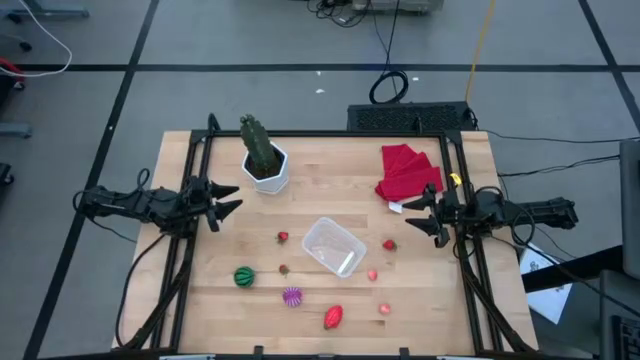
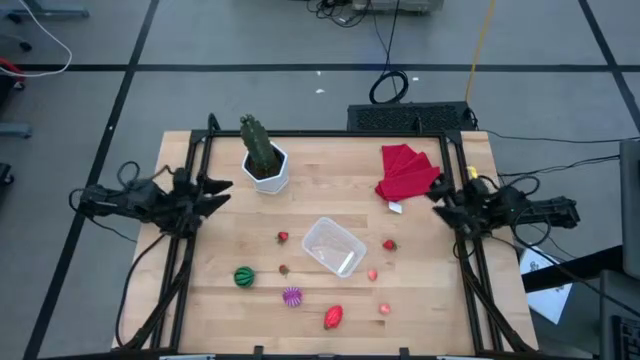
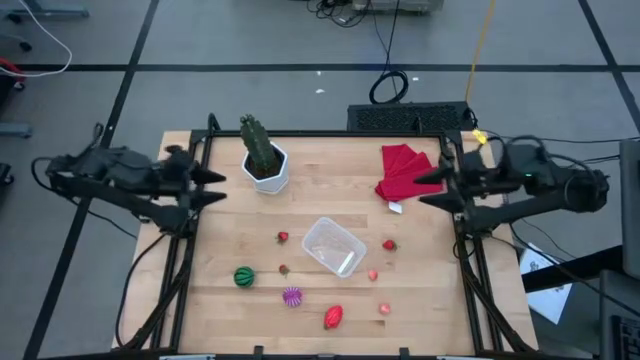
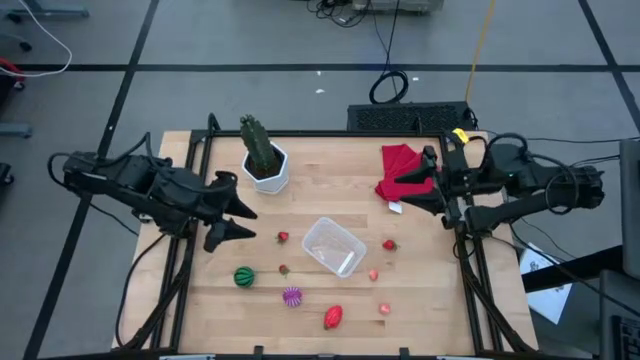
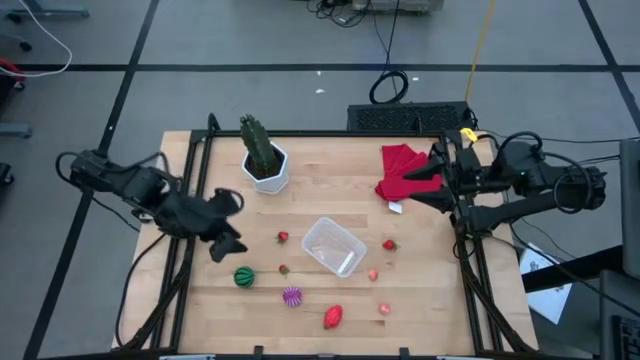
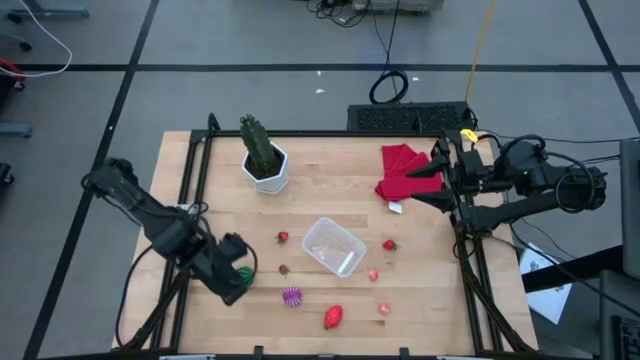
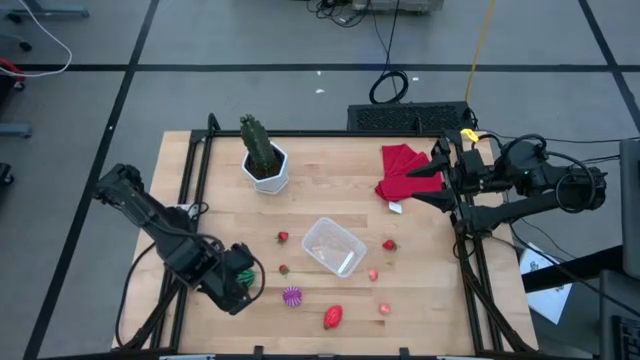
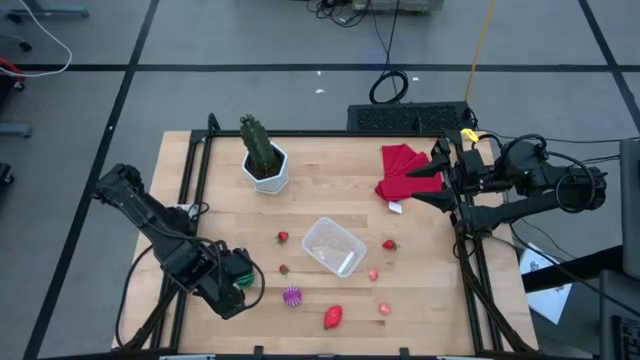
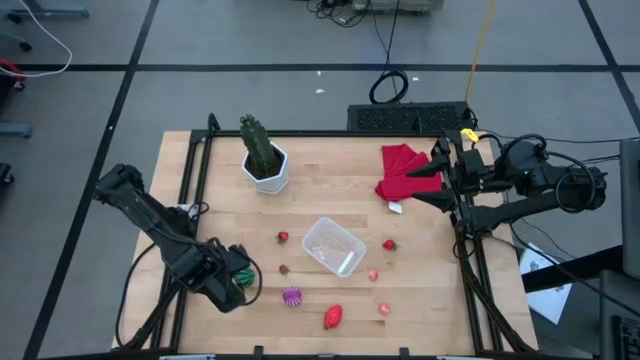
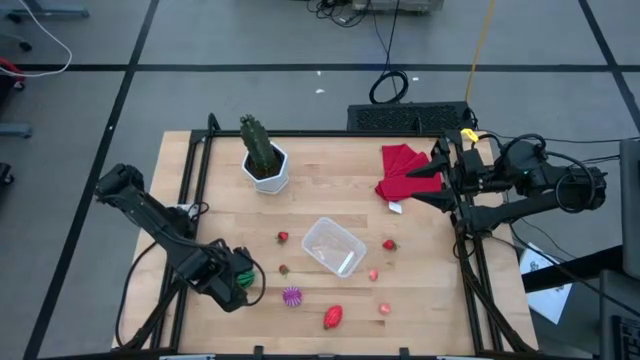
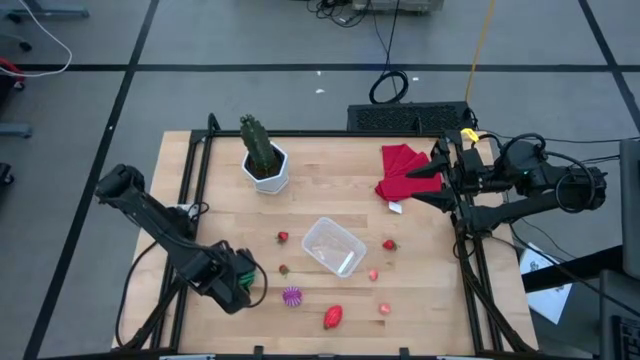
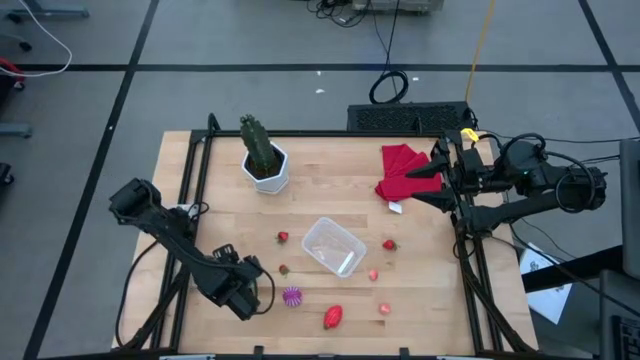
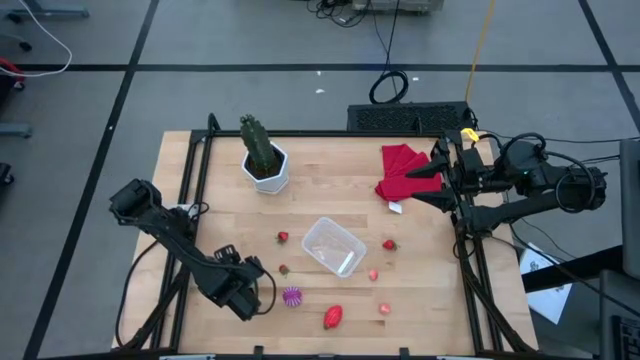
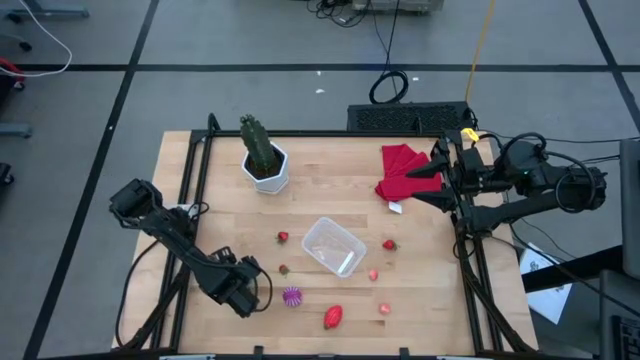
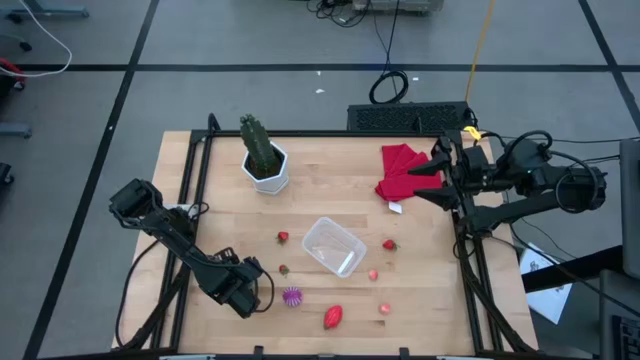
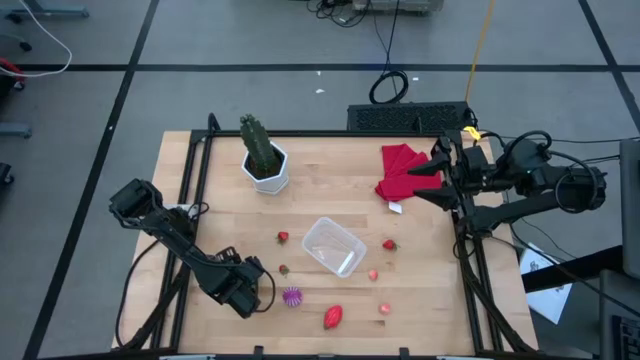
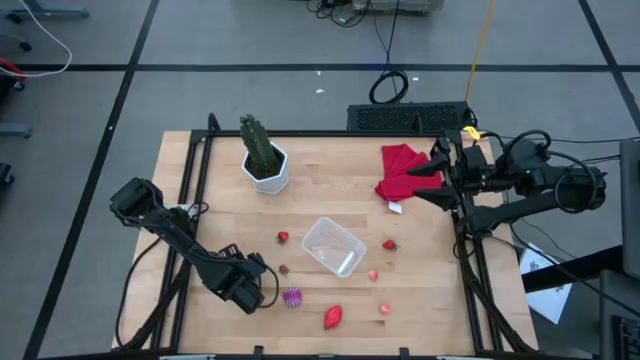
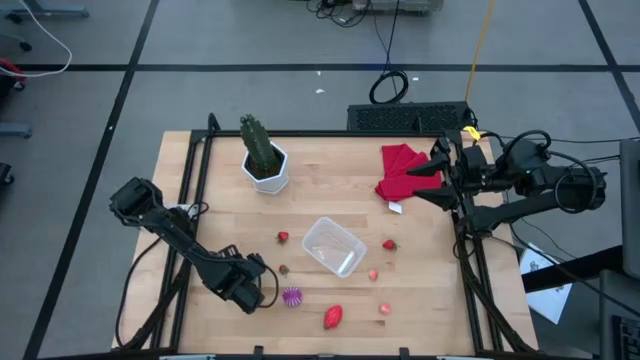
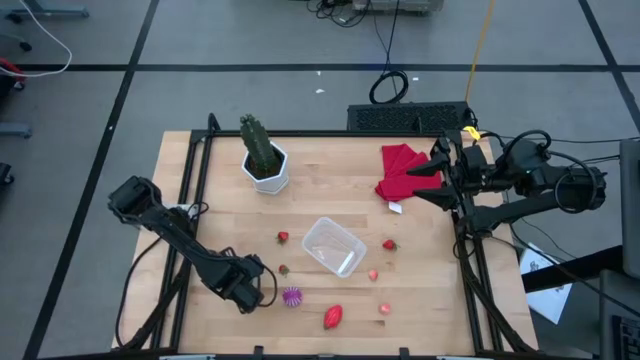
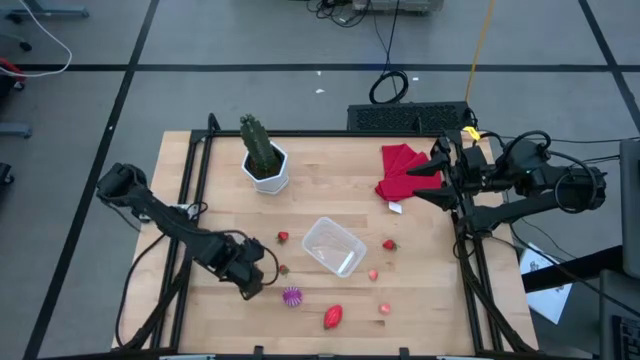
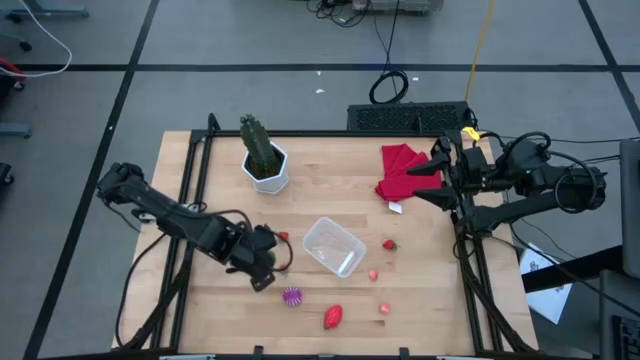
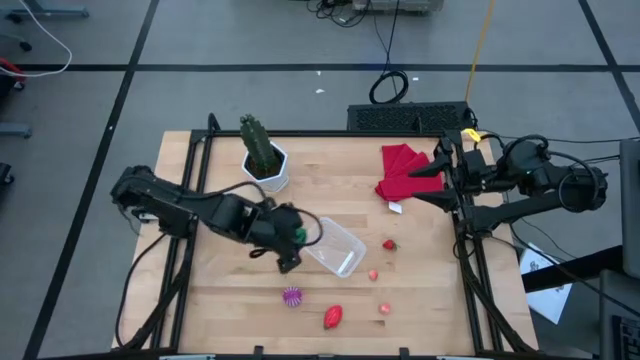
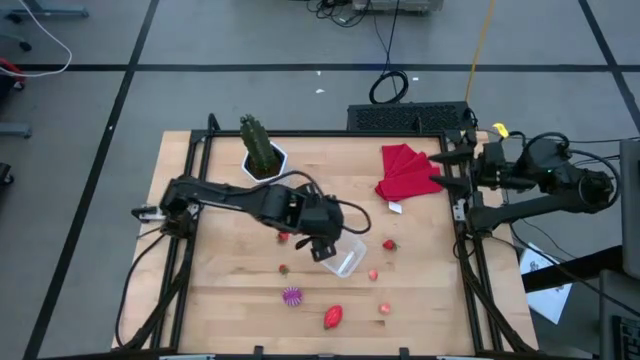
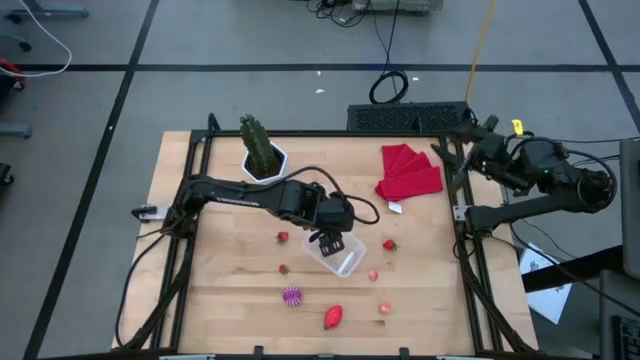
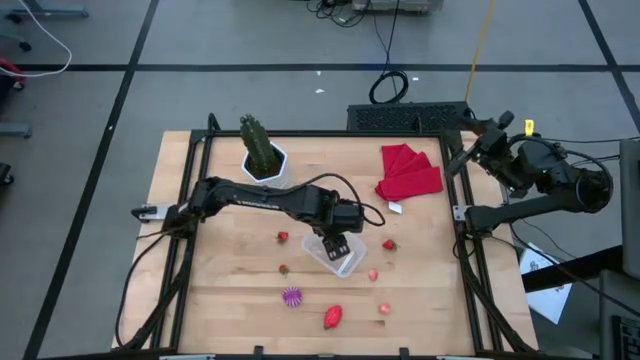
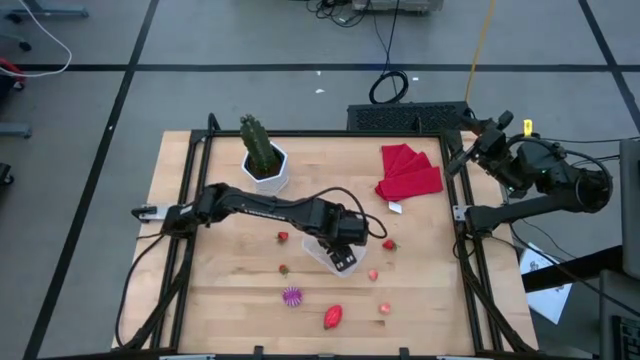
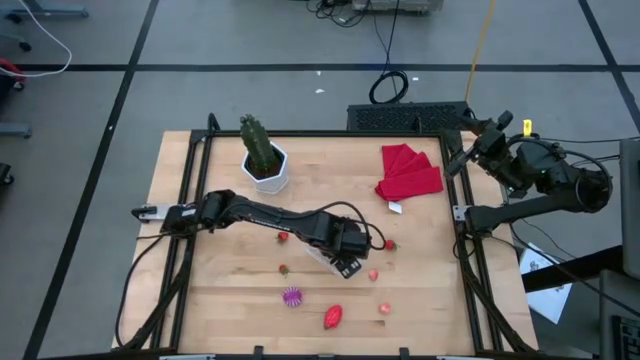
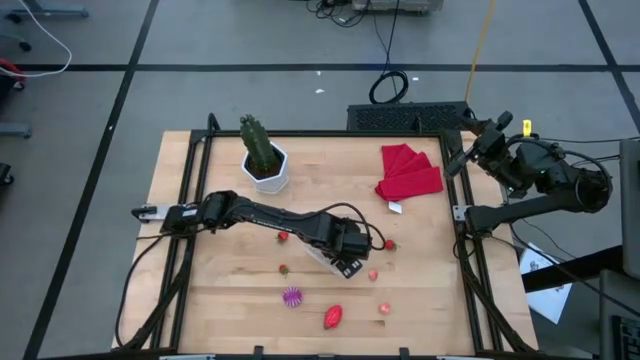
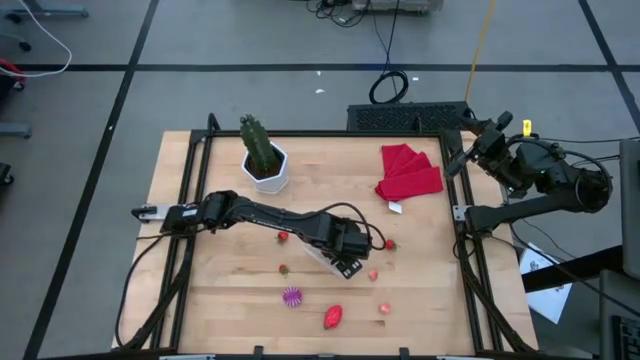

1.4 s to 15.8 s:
Task: Pick and placing Produce into tupperware
Put the watermelon into the transparent bin

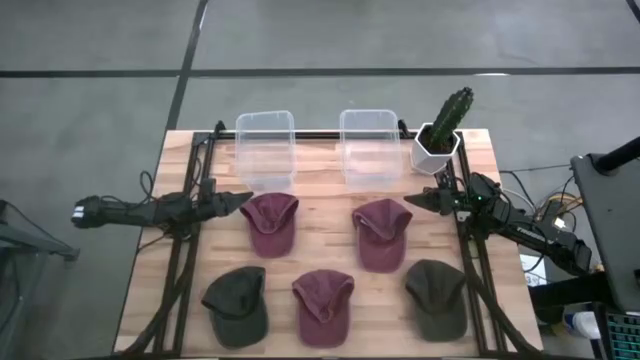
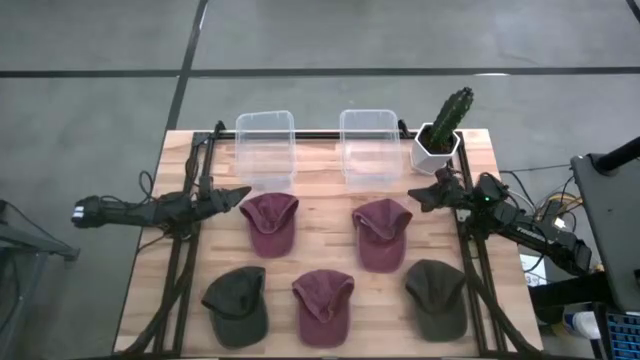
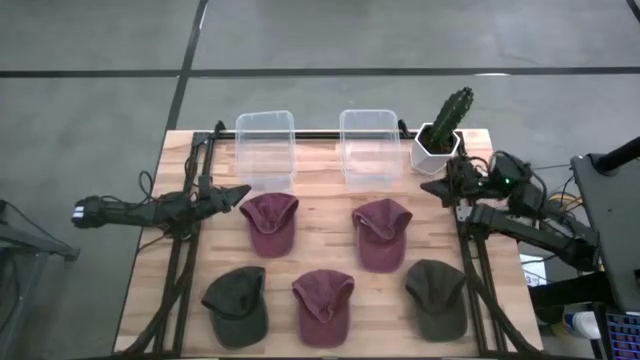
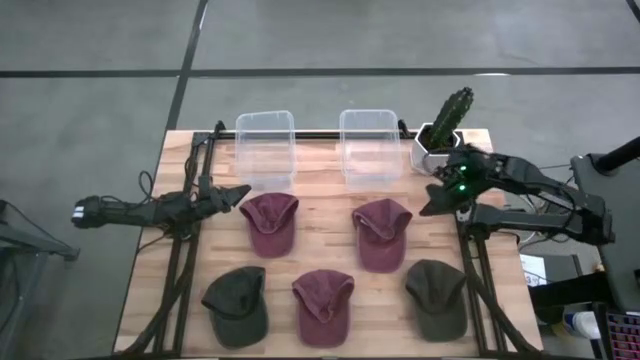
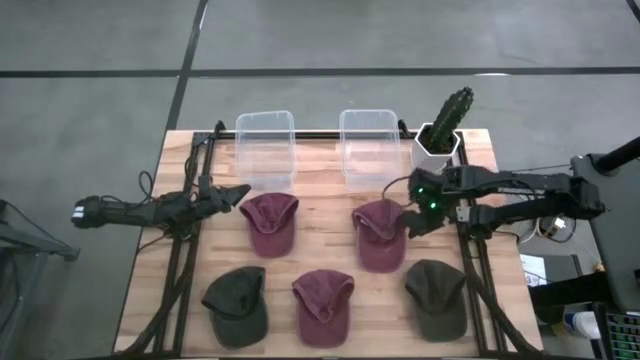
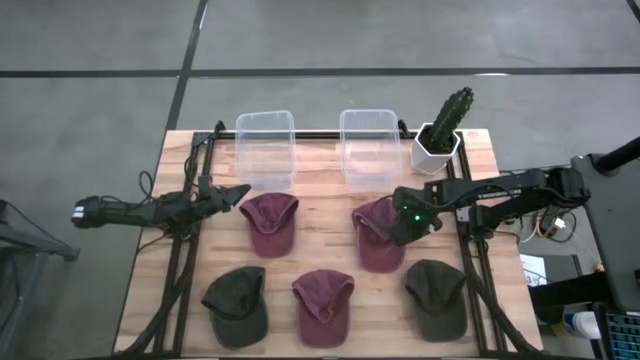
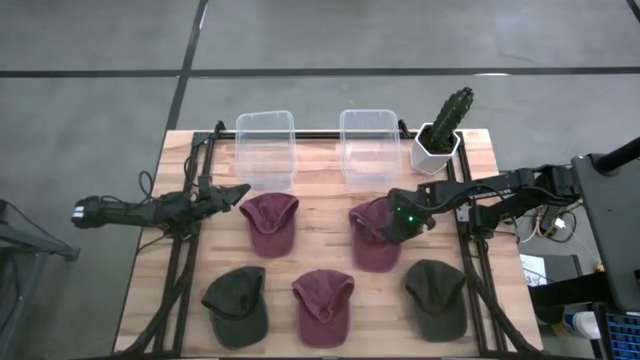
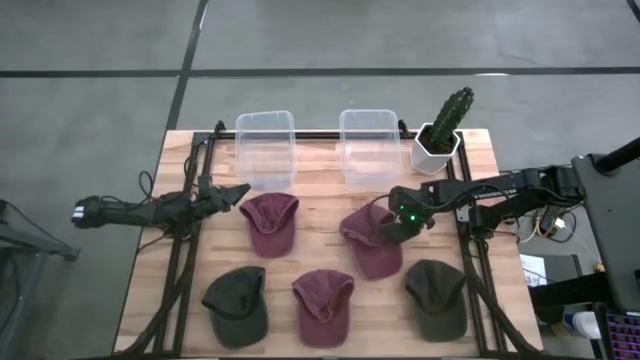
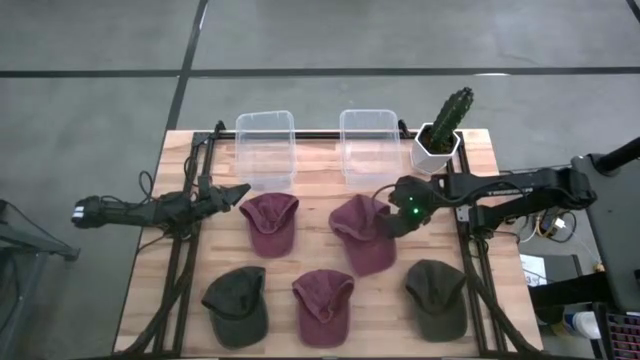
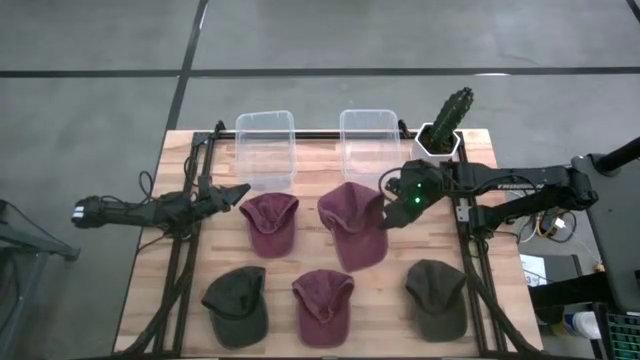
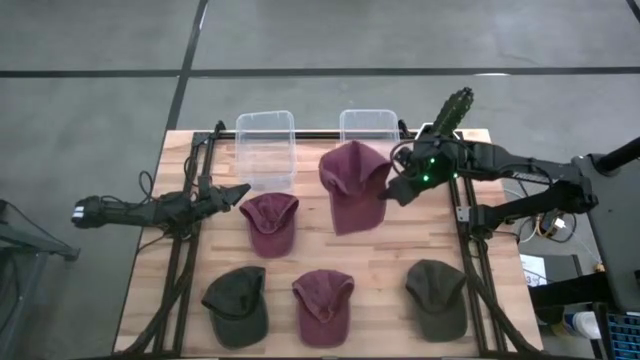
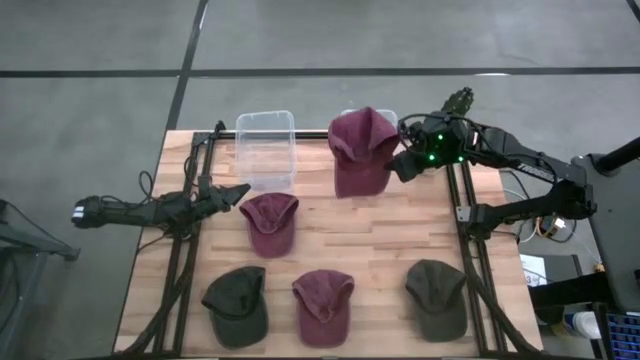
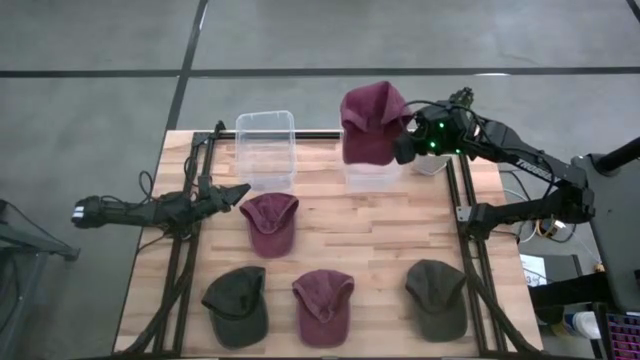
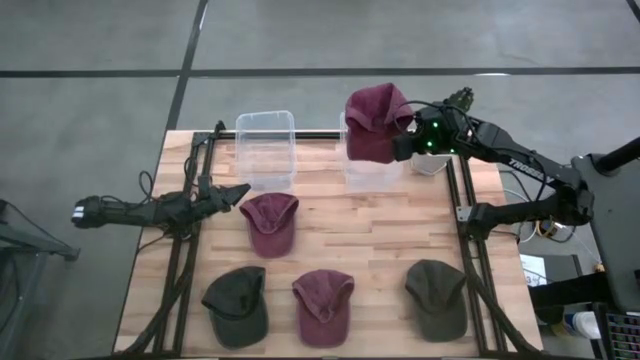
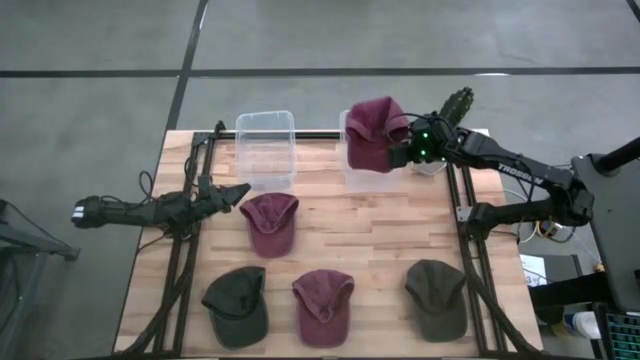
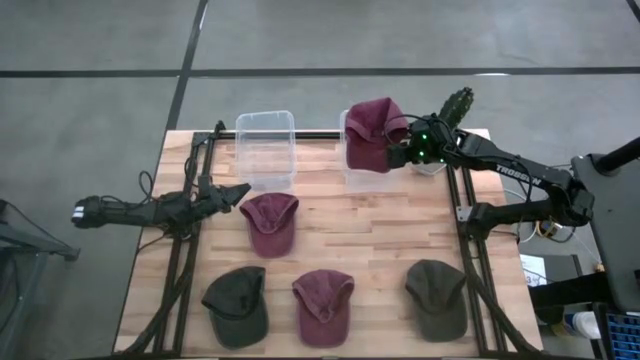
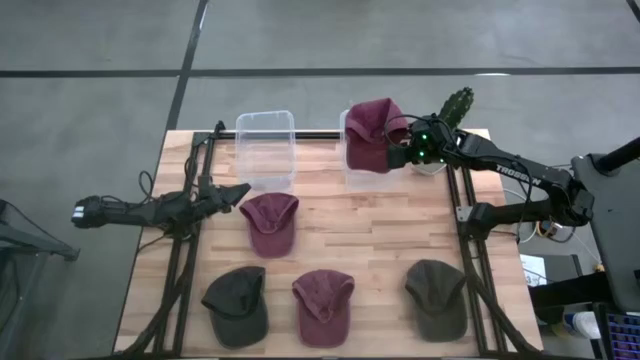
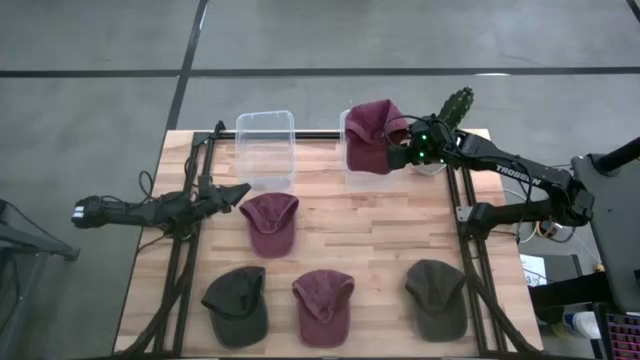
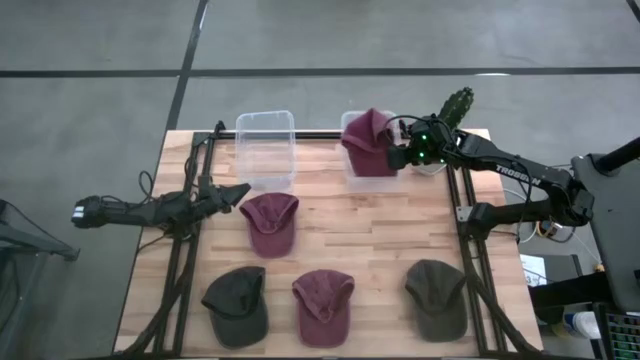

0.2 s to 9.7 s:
Task: Pick & Place hat
Put the top right red cap into the right transparent bin
